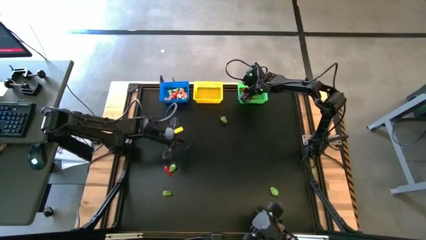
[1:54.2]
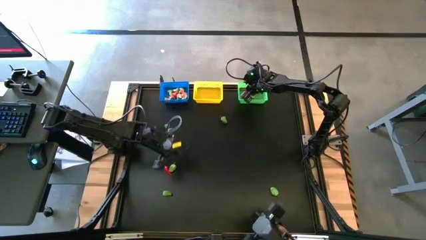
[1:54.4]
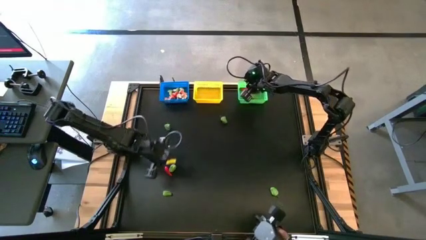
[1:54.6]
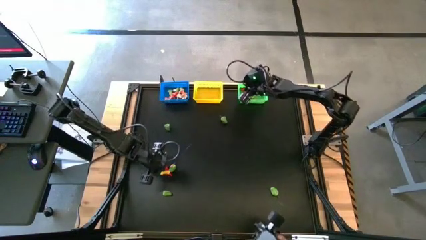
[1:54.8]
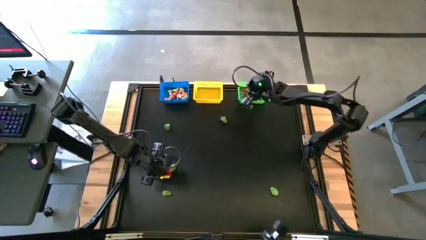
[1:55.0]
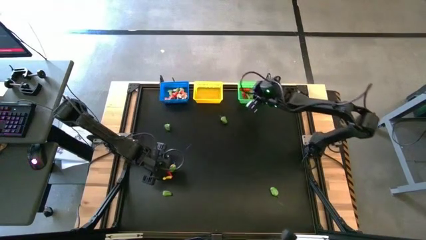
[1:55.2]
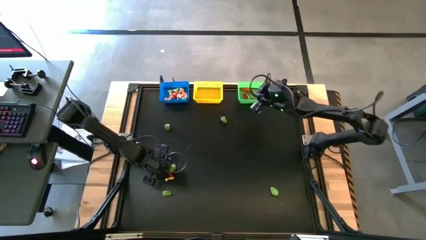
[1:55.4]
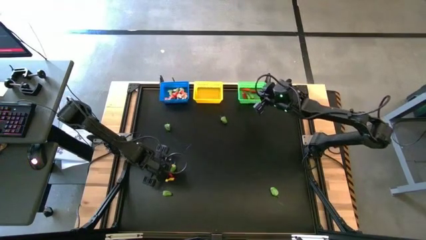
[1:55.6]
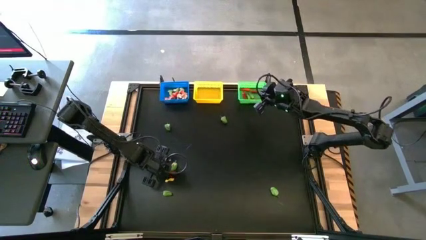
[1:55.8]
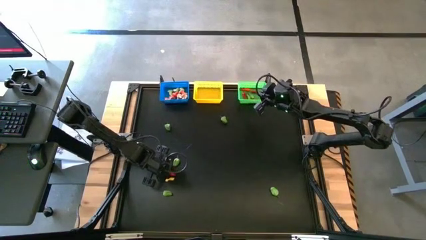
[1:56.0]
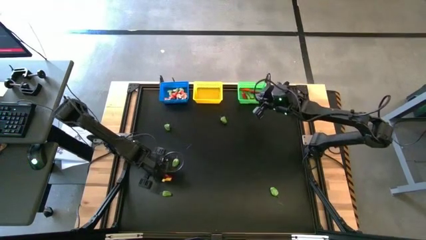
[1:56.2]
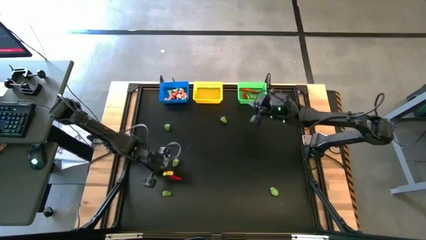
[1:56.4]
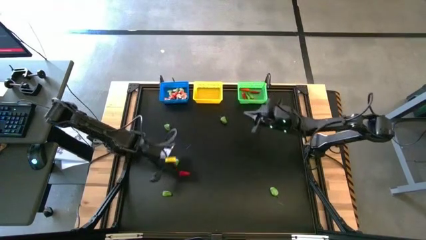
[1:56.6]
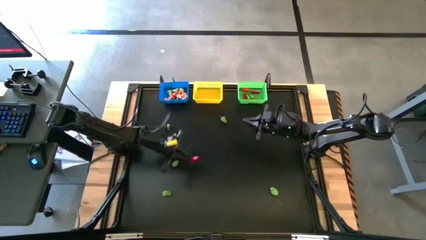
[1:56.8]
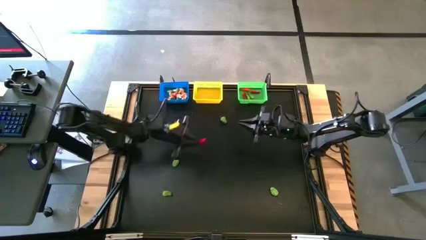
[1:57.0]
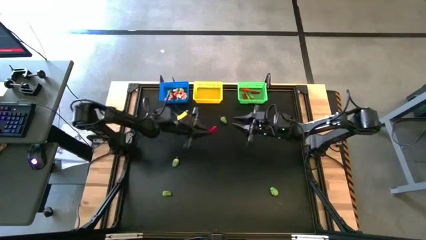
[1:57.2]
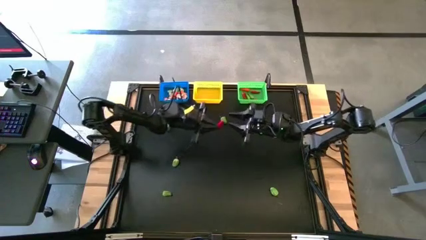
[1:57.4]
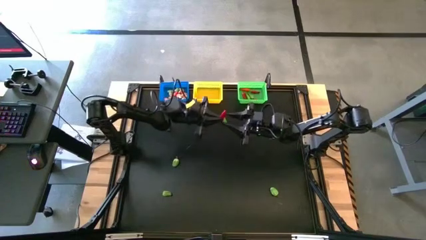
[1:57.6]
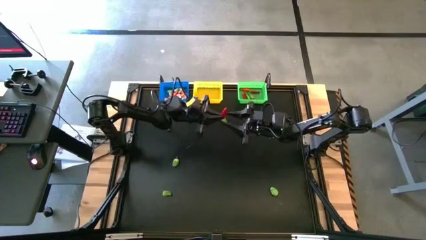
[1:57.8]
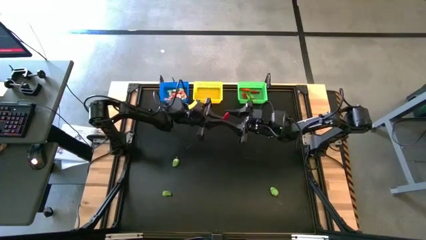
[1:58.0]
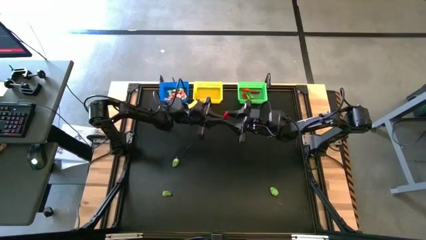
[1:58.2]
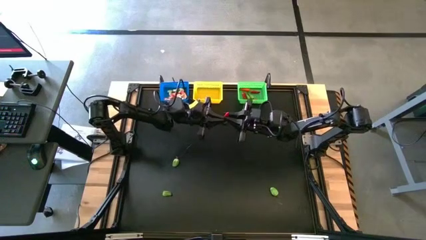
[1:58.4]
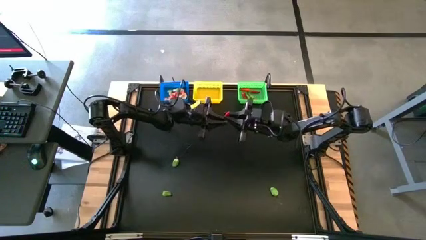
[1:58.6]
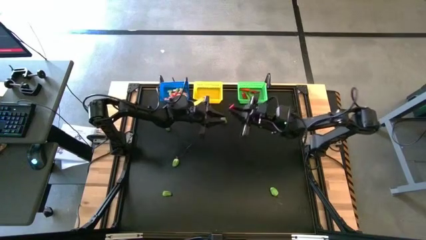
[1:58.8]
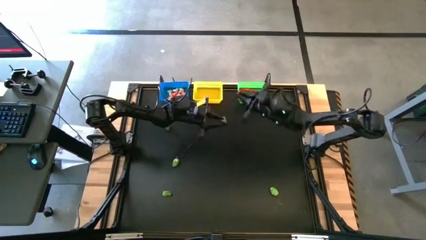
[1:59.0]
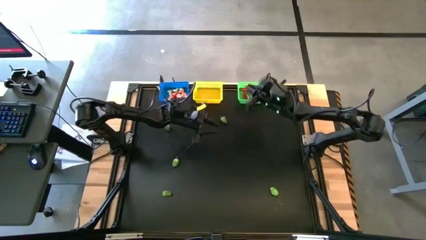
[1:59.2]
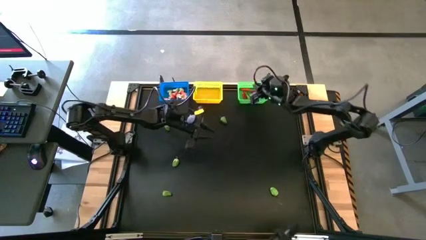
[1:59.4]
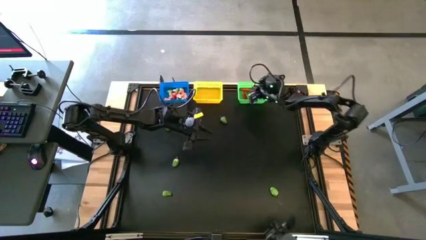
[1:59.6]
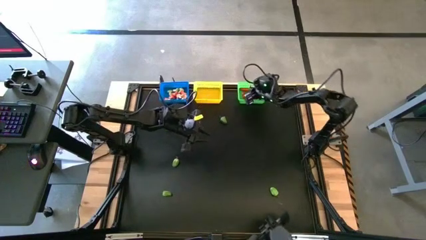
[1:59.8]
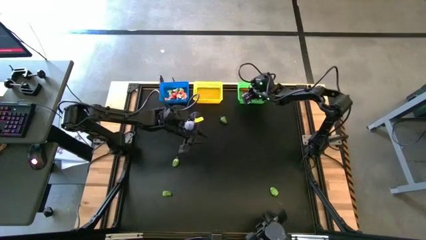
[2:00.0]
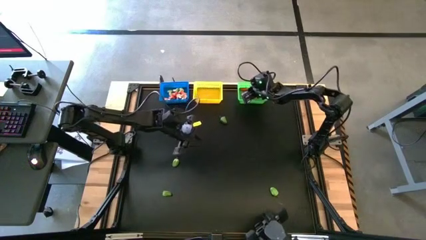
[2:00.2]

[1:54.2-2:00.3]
Task: Sort produce into baskets
Put the red chili pepper into the green bin

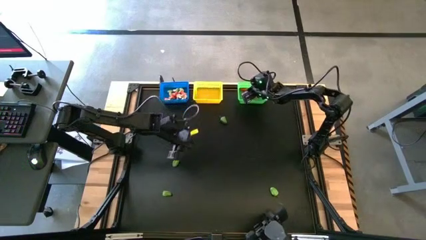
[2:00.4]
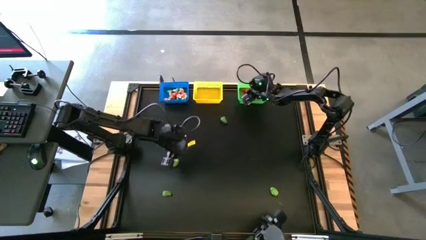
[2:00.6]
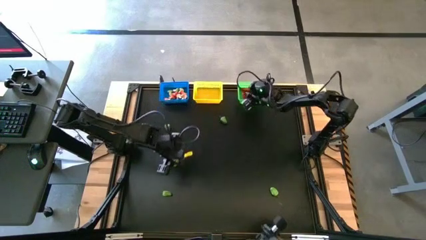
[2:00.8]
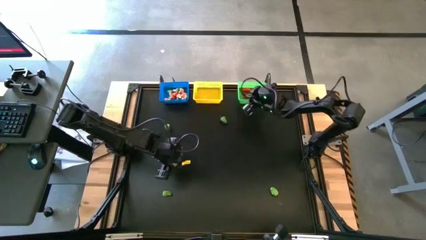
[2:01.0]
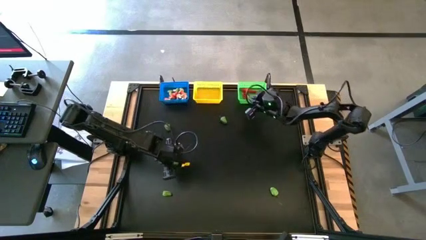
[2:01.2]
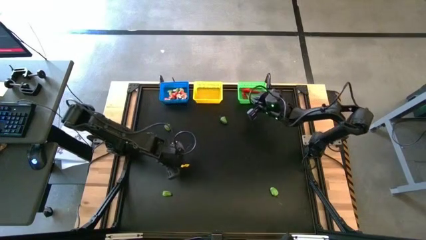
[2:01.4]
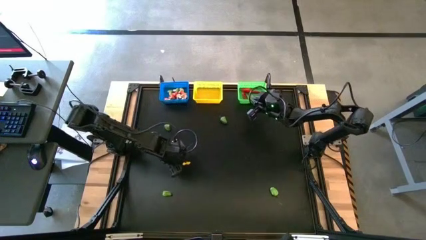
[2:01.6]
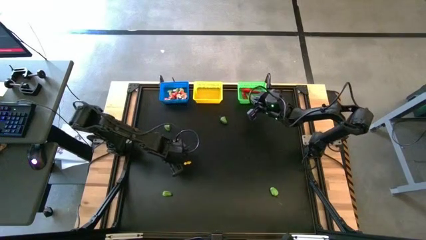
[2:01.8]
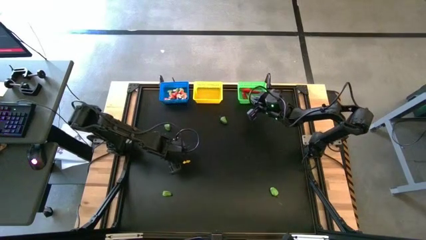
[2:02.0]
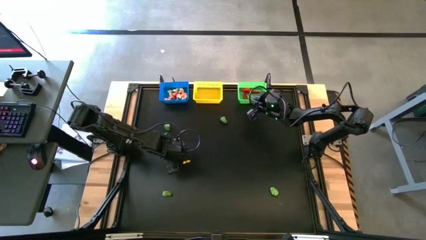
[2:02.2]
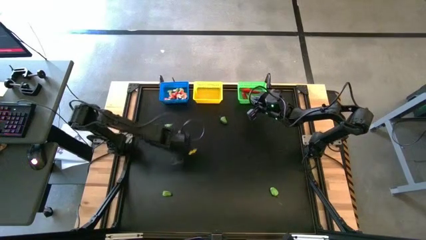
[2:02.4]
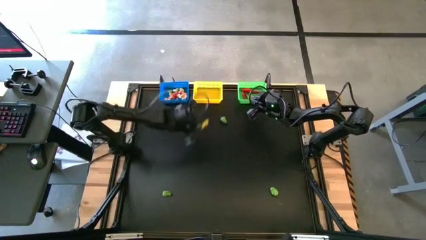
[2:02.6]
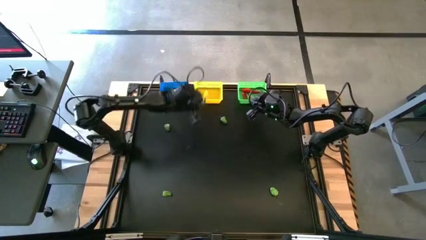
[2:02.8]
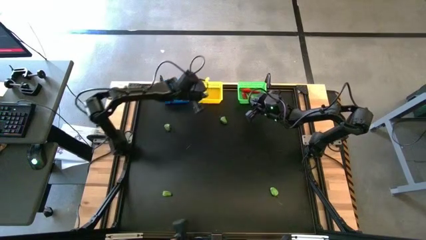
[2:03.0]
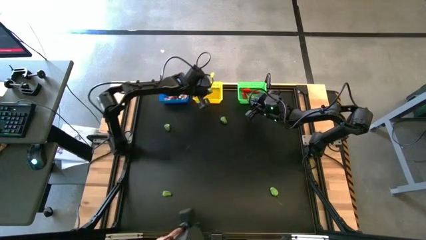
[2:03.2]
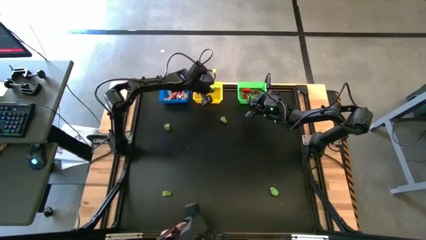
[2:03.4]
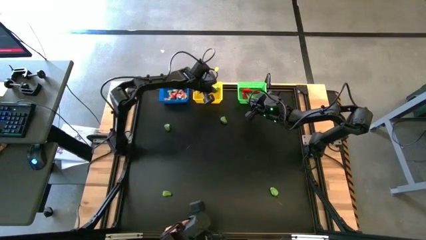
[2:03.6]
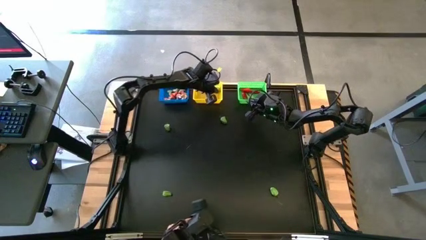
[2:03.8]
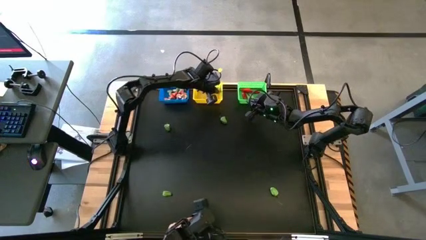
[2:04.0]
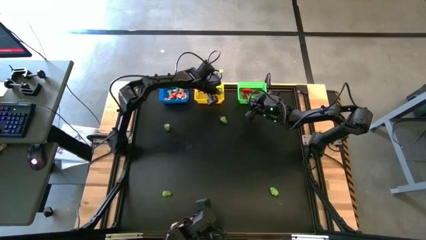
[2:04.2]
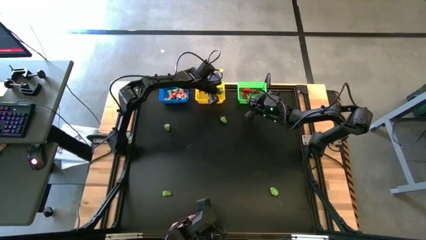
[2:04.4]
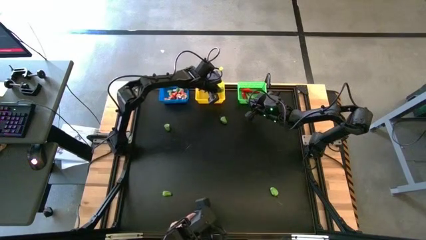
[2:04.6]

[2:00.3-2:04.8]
Put the green chili pepper into the yellow bin

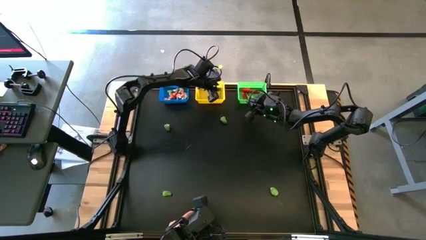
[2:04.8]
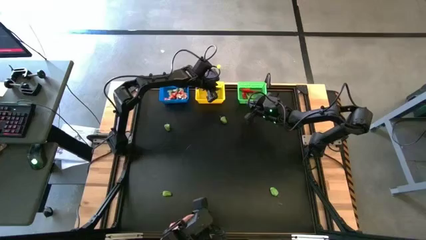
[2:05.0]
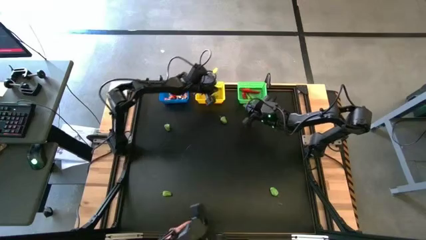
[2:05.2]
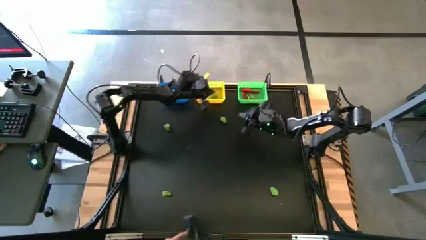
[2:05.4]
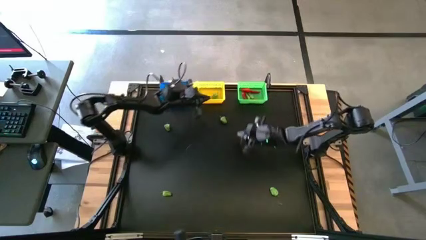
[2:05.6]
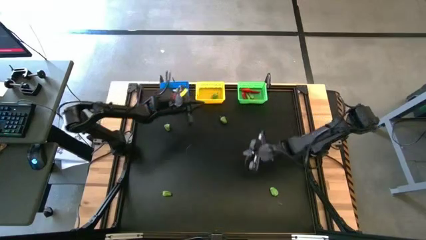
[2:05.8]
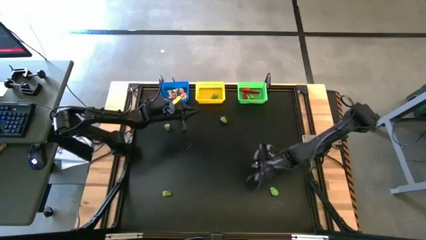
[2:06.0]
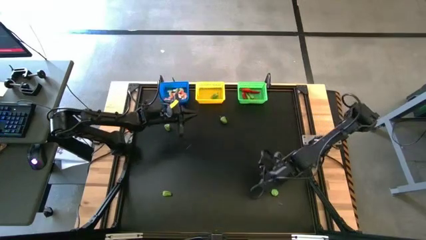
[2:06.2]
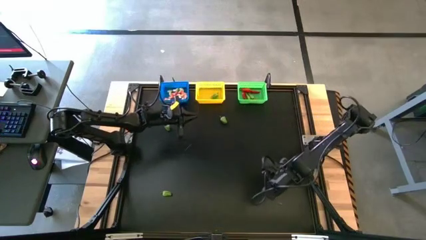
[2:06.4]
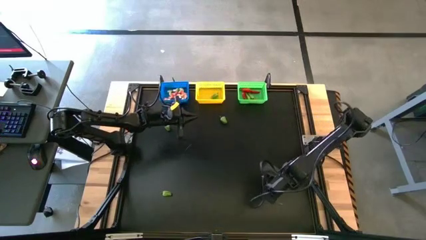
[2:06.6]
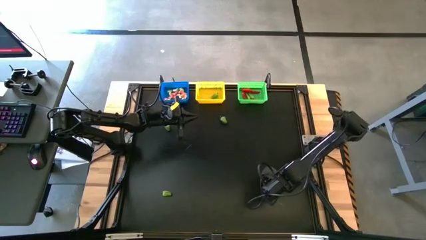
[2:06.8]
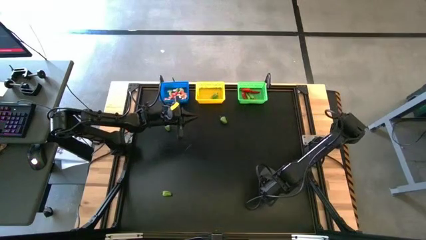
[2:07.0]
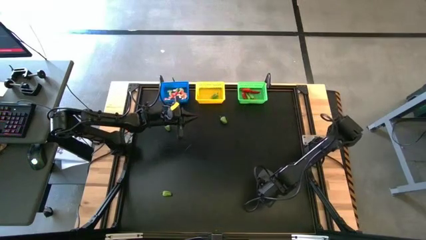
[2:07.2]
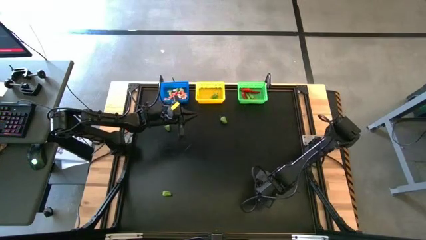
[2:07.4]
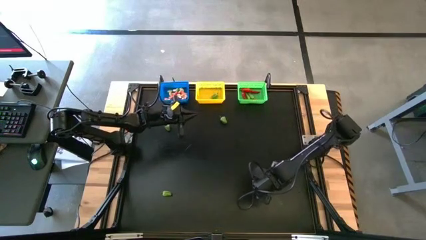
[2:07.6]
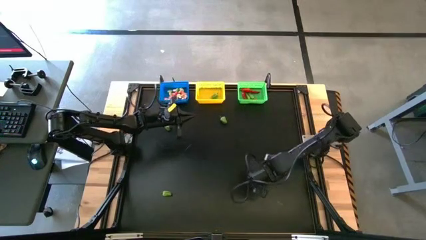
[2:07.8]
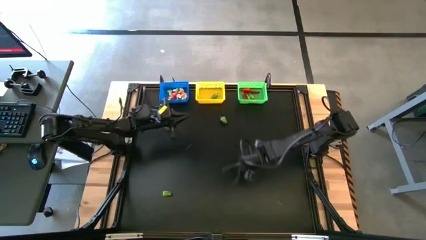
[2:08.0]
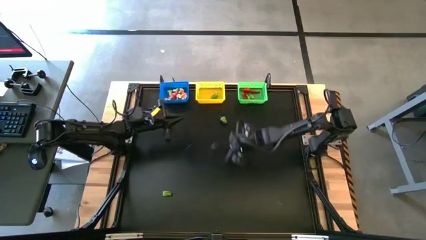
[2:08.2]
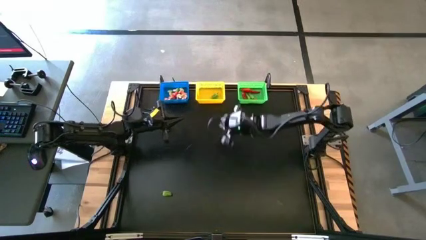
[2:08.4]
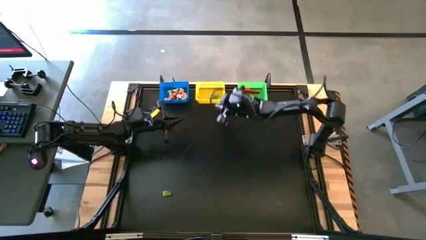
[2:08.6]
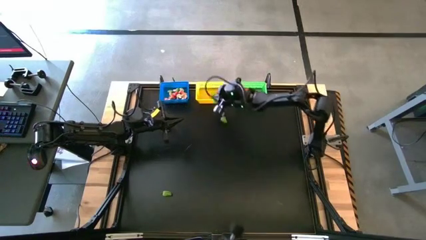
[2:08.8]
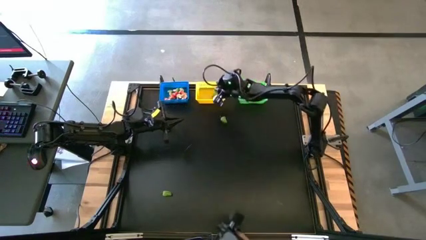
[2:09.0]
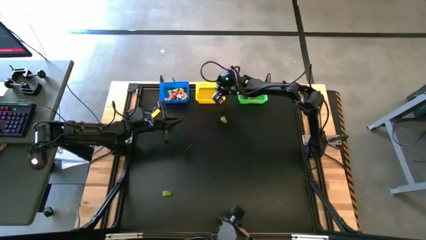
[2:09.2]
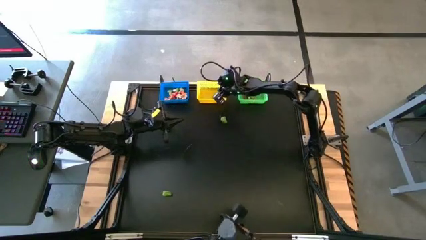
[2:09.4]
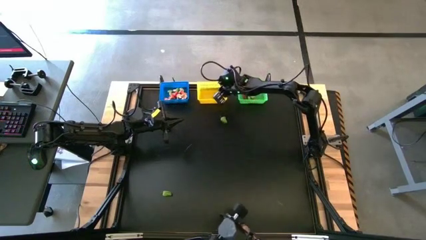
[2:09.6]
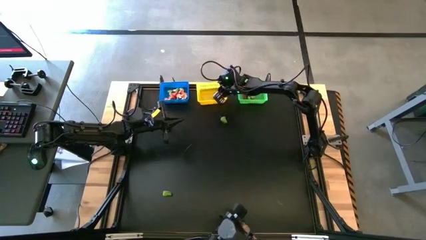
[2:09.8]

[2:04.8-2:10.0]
Put the green chili pepper into the yellow bin

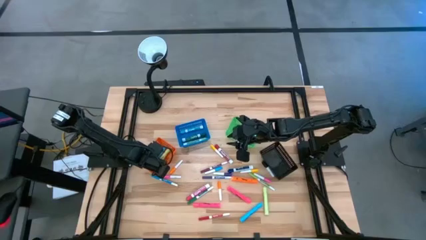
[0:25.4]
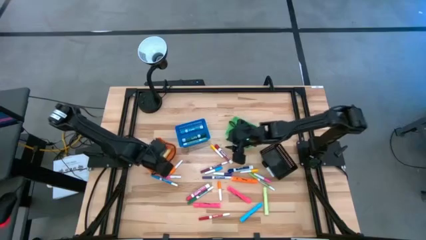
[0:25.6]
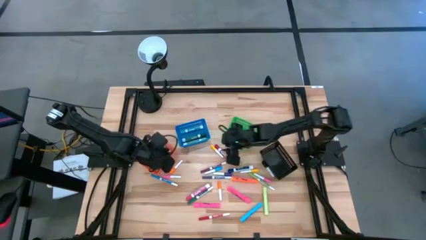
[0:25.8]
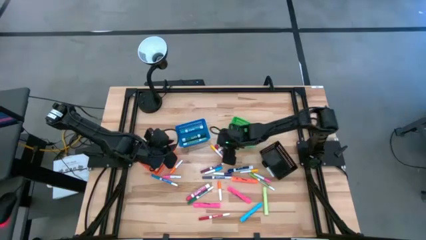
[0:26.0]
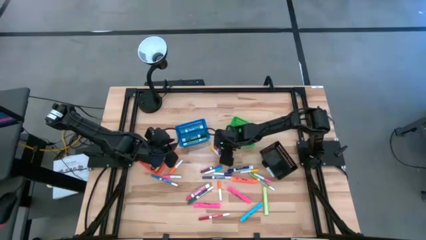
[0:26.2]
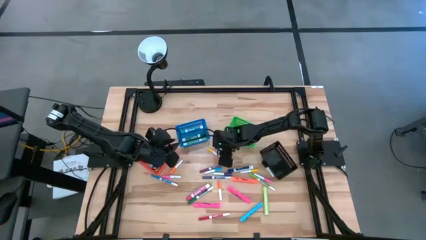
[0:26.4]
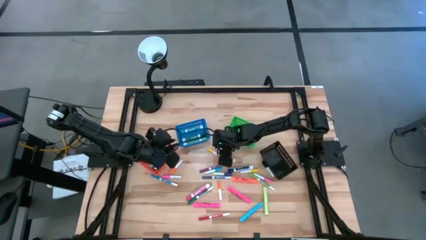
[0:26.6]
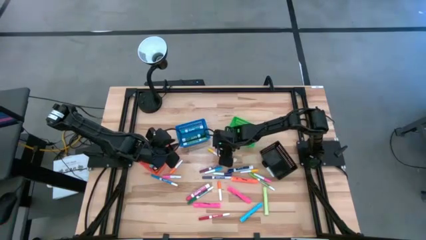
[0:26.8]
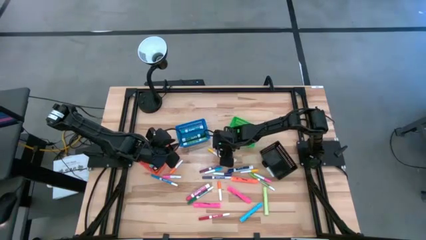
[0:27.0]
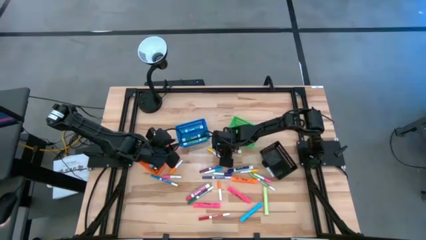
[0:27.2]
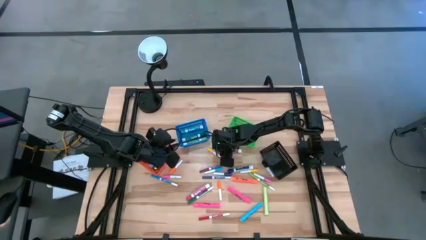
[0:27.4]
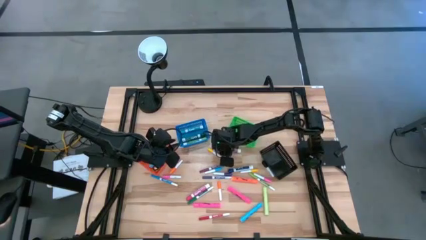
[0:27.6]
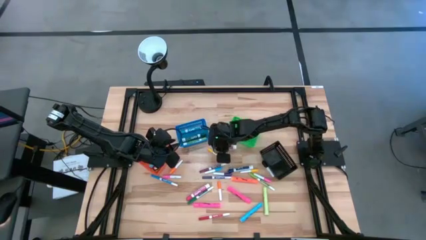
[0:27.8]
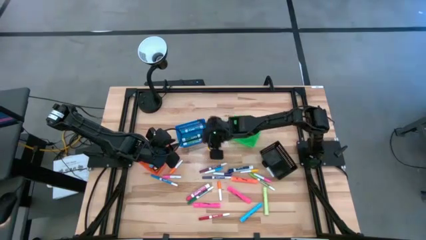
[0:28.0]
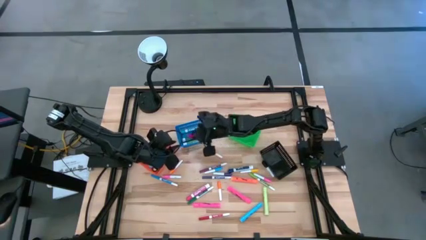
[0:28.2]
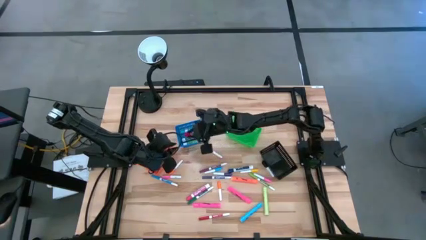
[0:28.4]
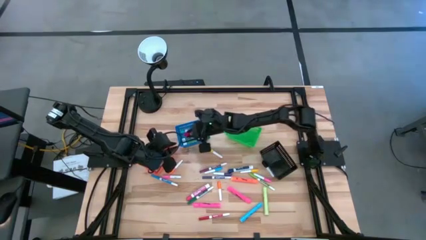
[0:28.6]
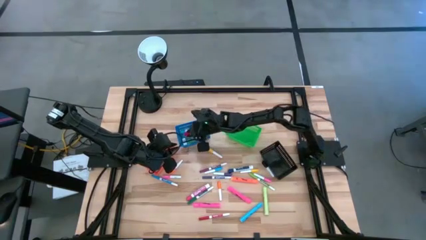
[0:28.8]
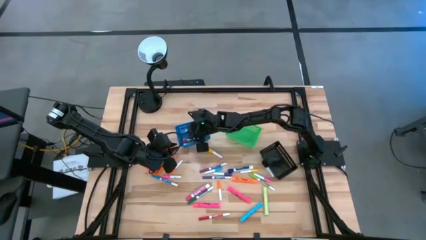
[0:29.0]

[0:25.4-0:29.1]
Task: Pick & Place Markers
Put the red marker pen into the blue basket
